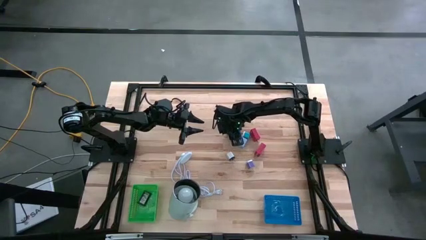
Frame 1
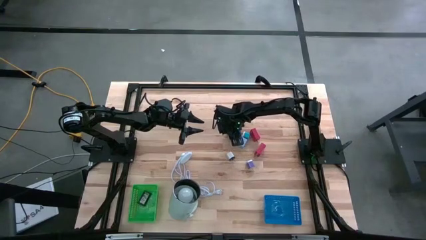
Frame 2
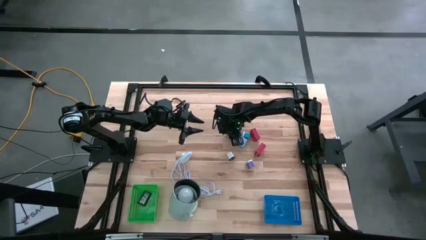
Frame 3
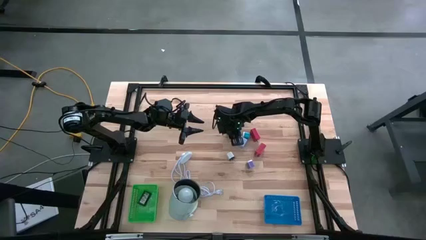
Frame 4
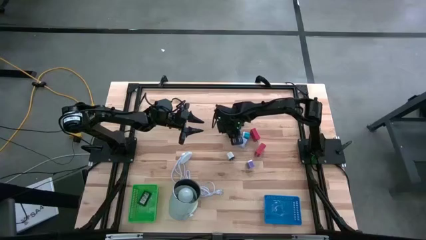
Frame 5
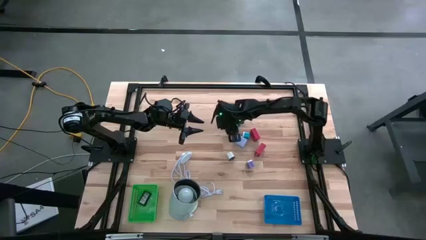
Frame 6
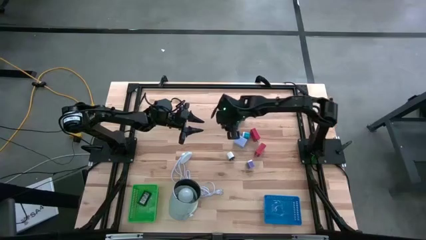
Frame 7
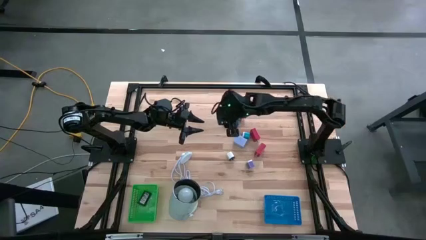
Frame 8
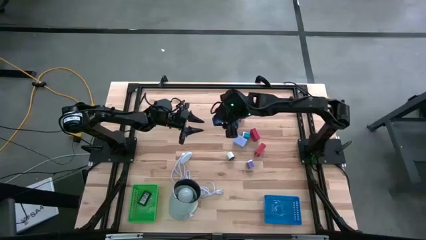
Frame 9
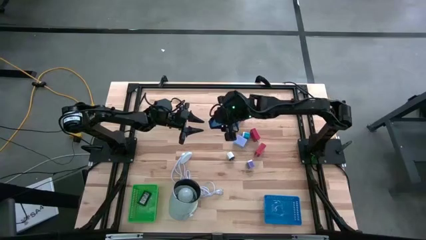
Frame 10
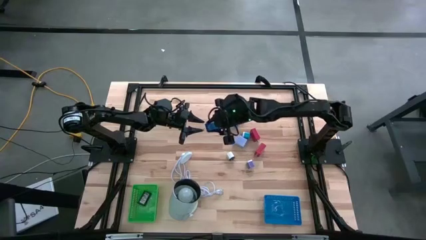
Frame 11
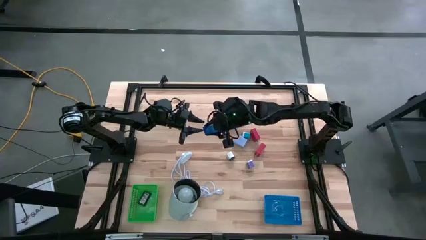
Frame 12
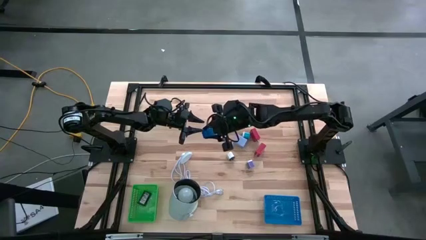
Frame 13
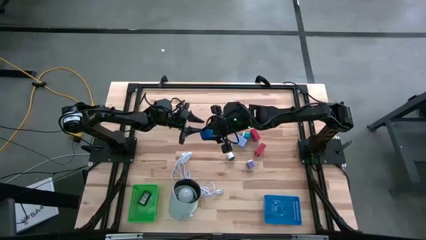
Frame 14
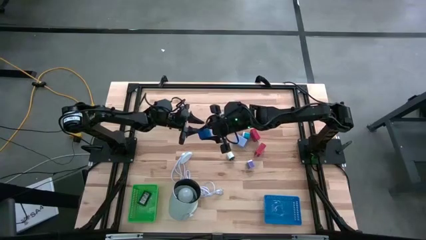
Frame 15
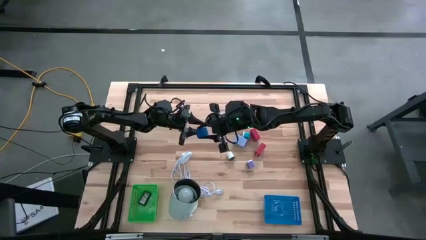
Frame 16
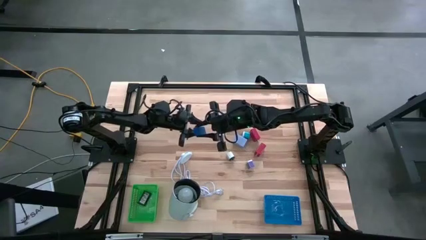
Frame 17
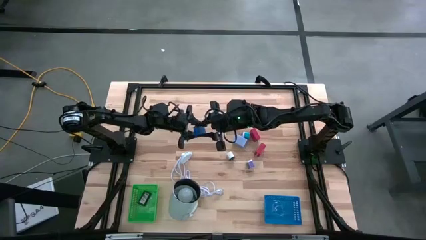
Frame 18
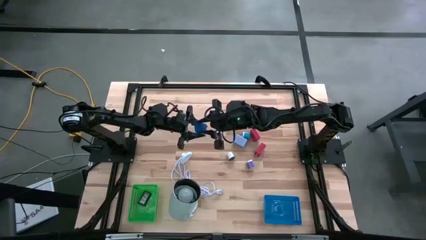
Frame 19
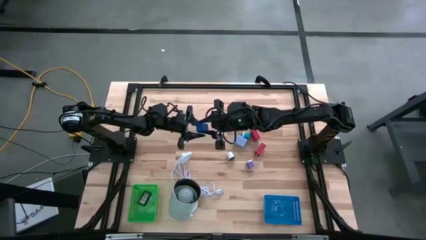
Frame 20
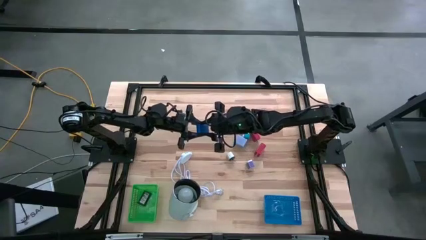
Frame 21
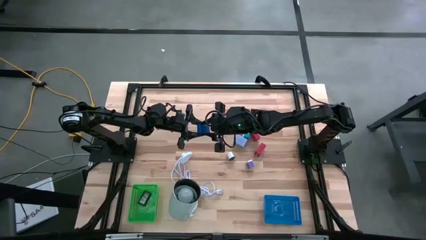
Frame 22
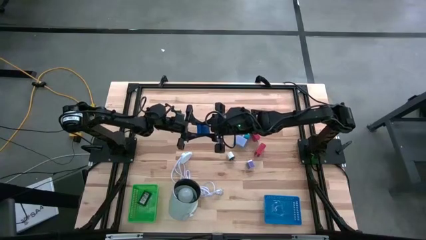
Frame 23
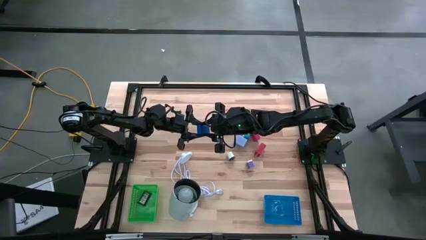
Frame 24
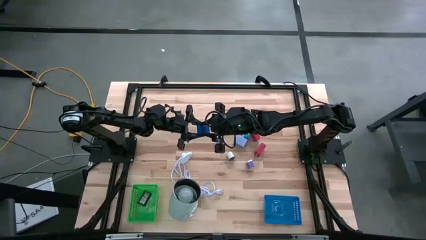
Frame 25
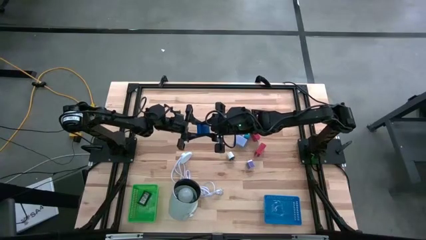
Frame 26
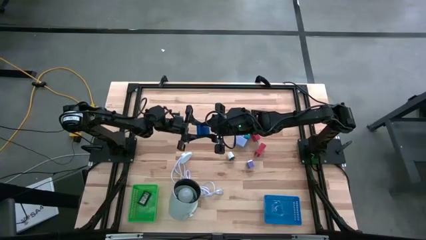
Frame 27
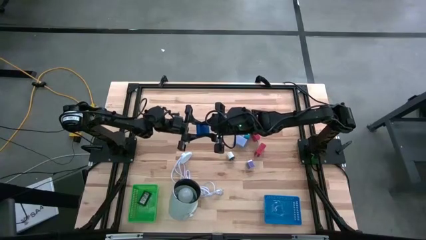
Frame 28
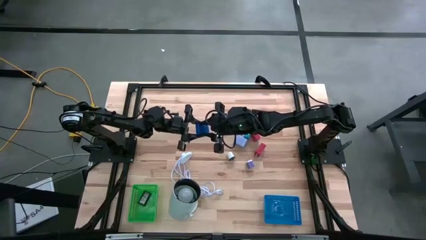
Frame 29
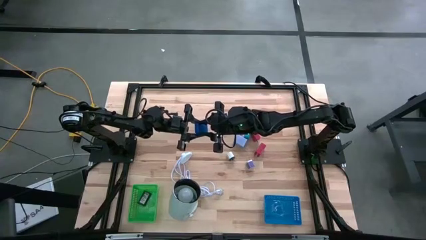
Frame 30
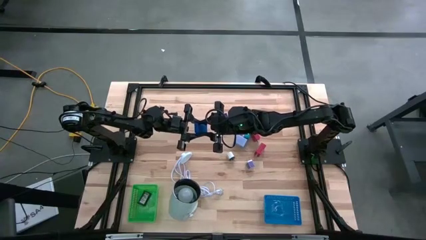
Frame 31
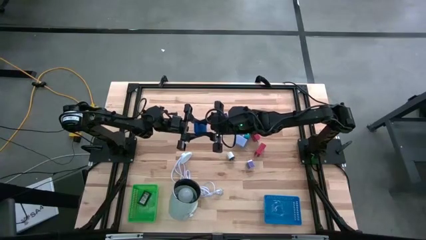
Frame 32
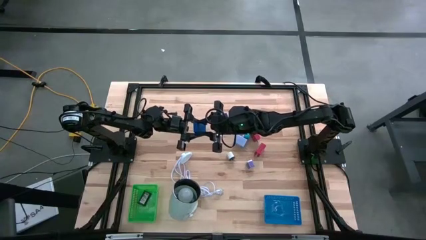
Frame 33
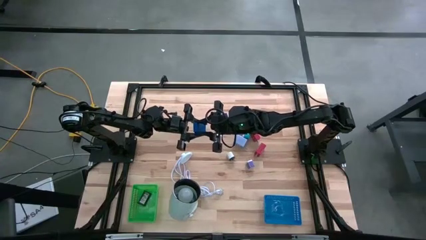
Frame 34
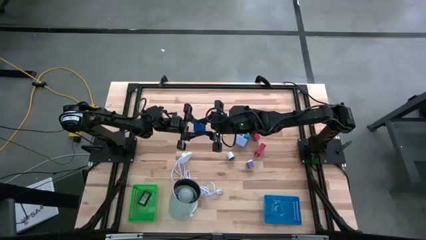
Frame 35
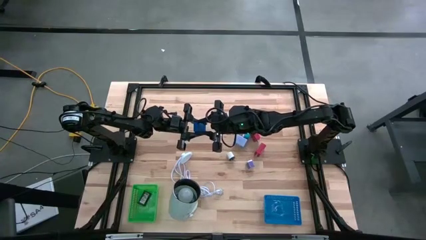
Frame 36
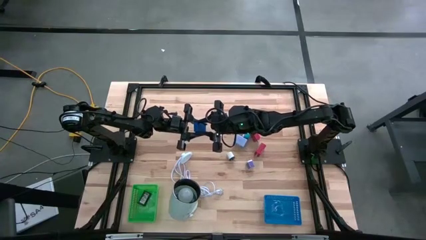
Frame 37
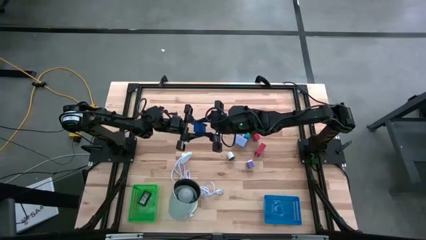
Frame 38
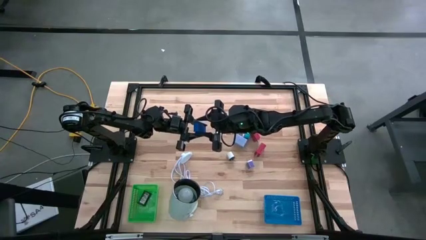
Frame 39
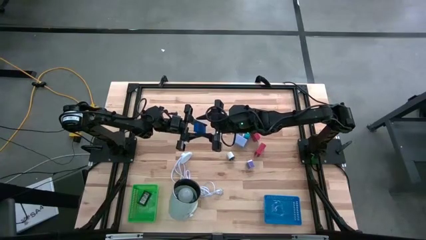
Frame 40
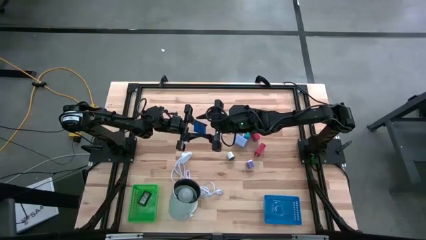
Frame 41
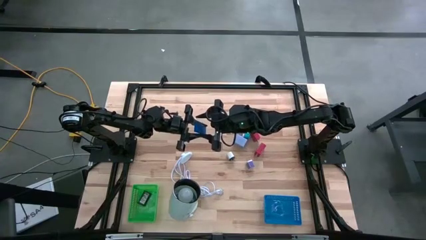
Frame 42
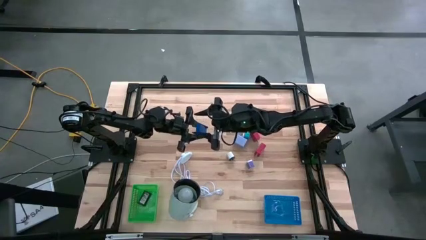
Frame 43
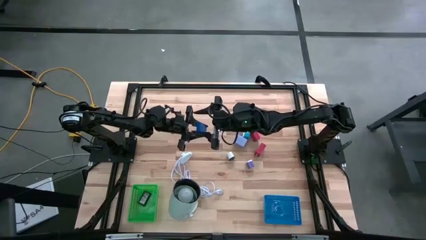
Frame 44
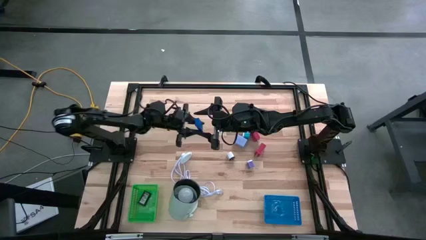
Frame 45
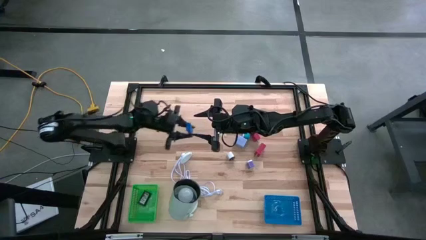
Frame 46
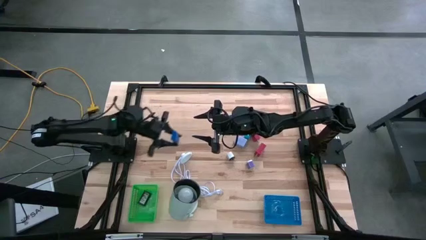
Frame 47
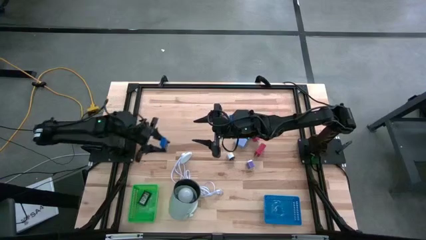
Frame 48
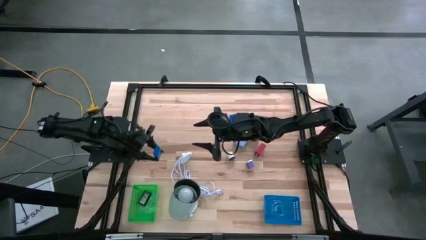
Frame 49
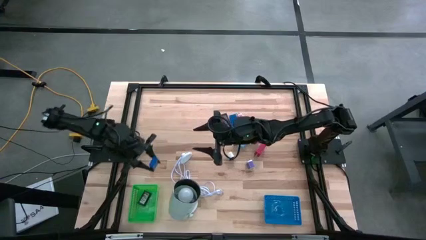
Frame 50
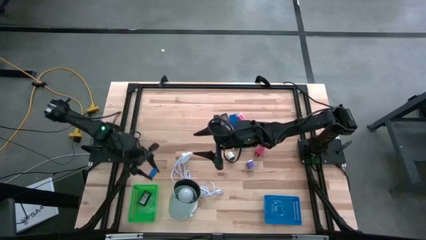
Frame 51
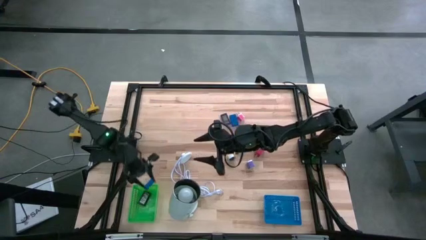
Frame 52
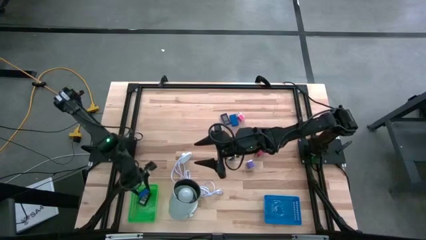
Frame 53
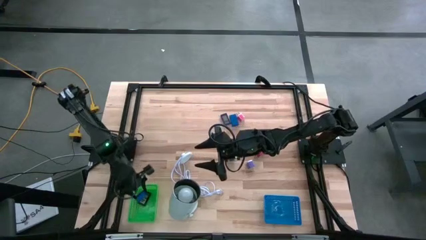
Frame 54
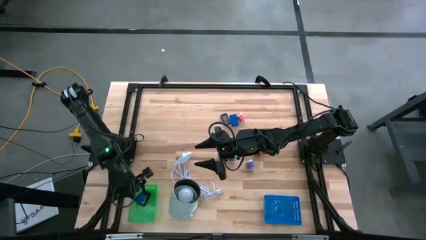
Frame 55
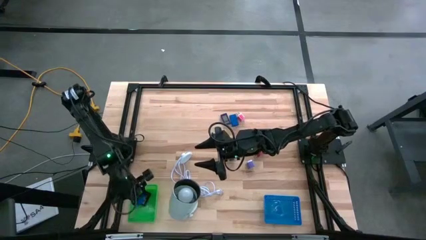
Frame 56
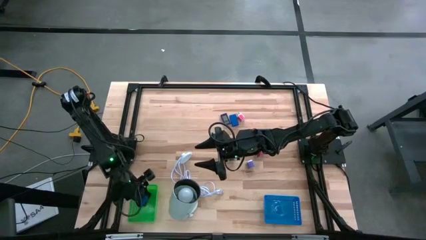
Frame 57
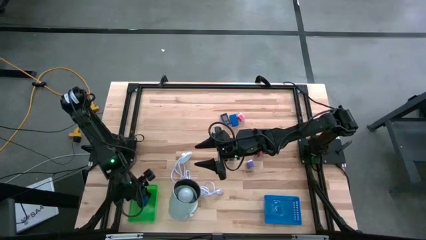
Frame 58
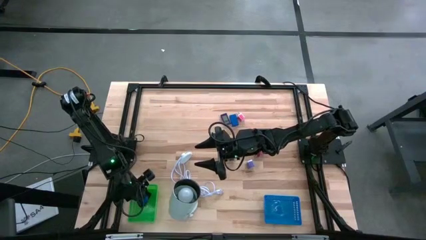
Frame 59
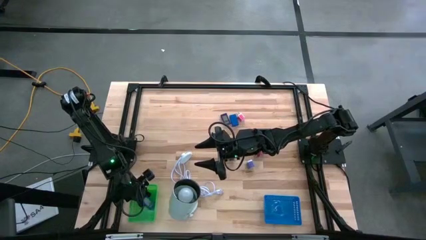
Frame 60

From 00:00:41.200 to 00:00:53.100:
Task: Pick & Place Office items
Put the bottom blue digital timer into the green basket

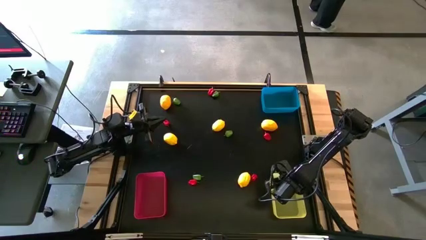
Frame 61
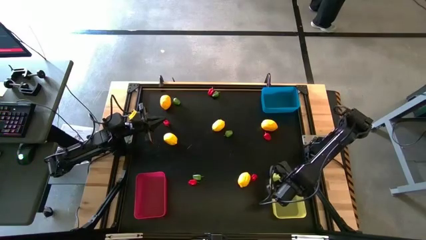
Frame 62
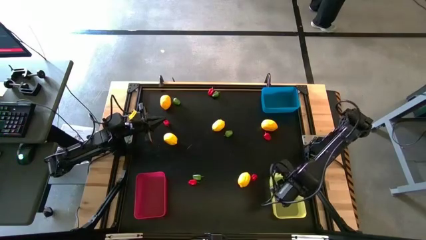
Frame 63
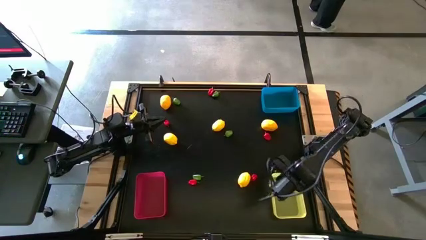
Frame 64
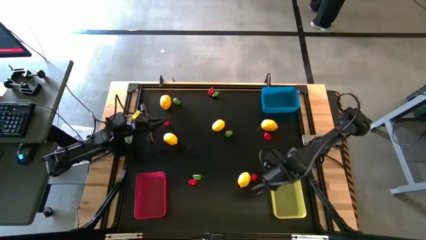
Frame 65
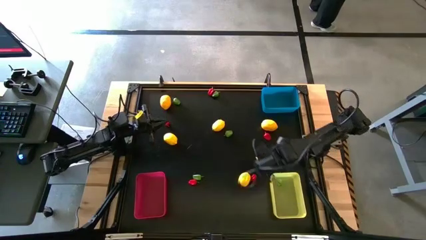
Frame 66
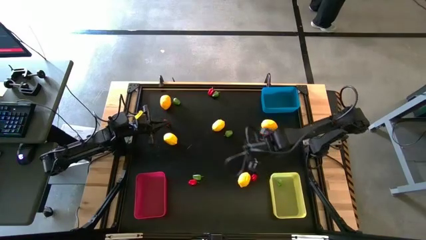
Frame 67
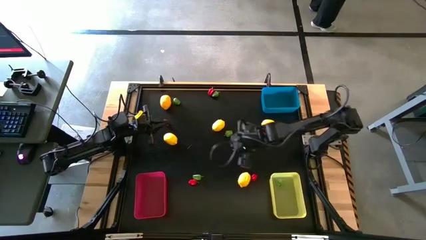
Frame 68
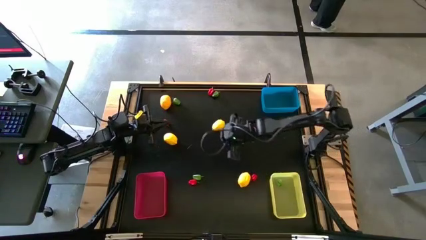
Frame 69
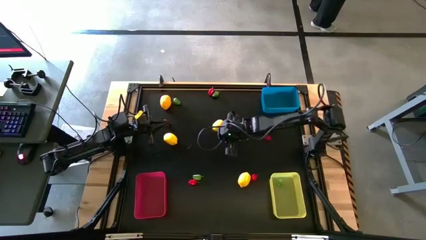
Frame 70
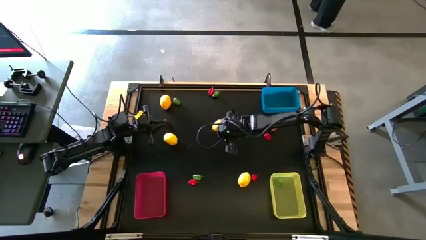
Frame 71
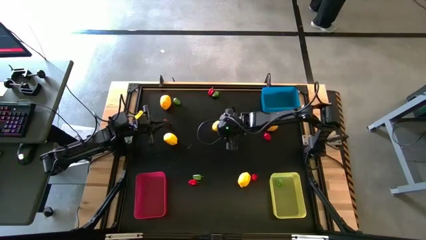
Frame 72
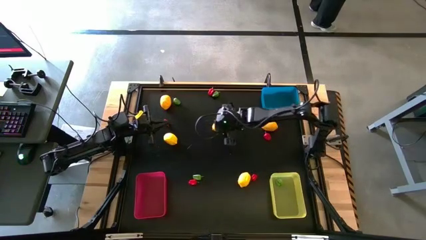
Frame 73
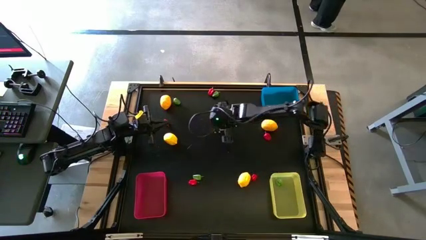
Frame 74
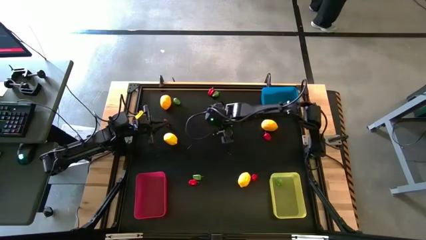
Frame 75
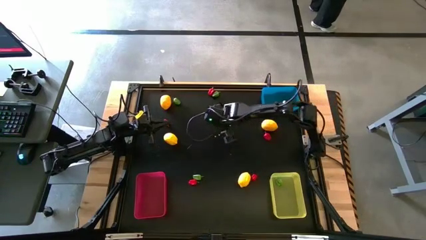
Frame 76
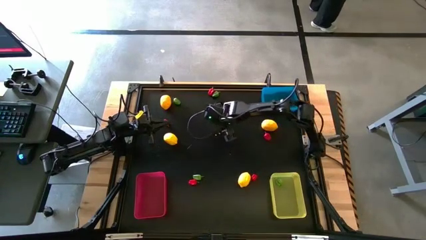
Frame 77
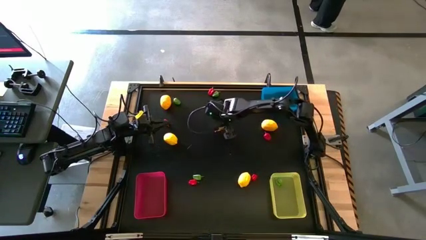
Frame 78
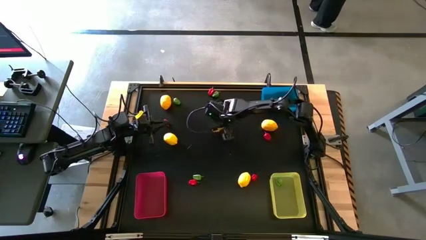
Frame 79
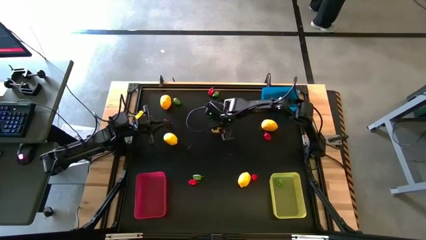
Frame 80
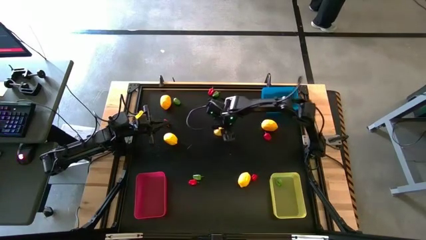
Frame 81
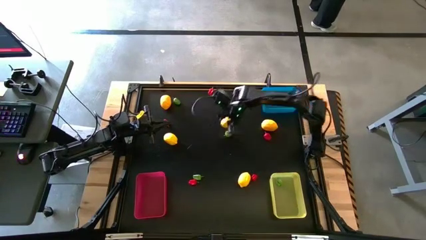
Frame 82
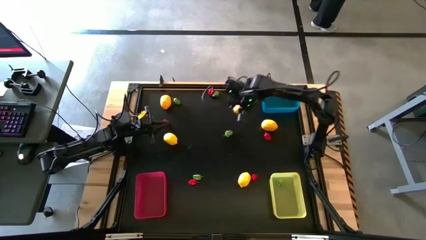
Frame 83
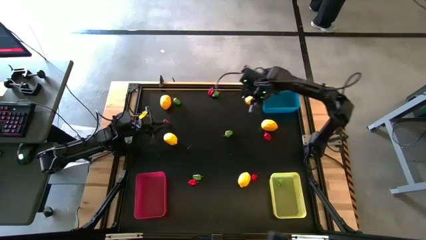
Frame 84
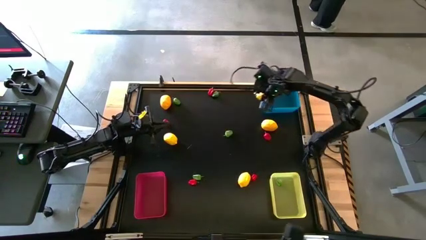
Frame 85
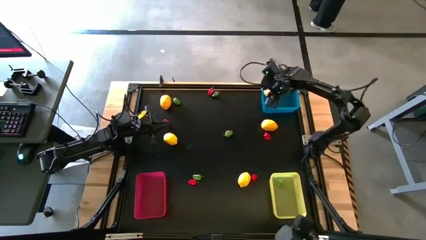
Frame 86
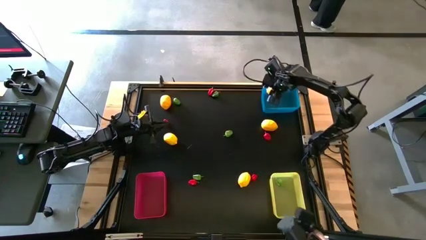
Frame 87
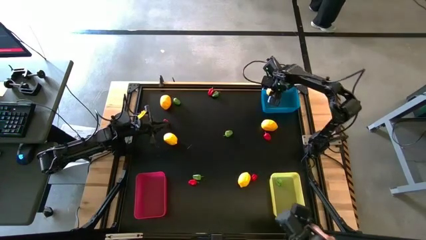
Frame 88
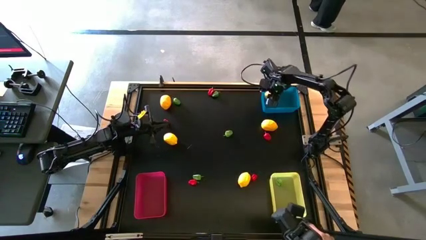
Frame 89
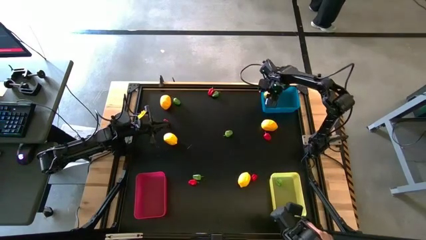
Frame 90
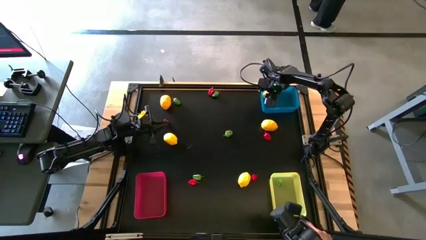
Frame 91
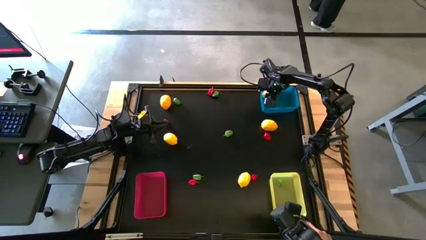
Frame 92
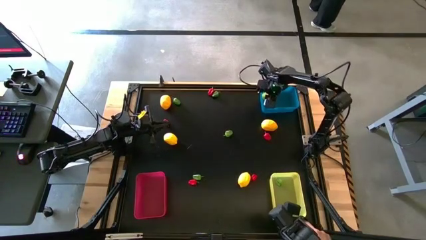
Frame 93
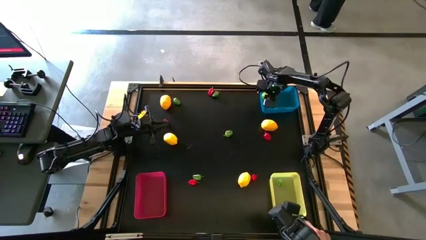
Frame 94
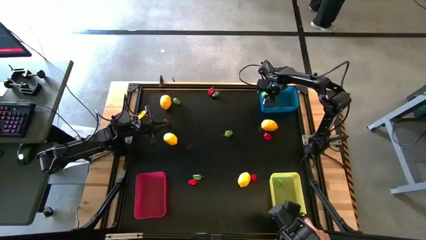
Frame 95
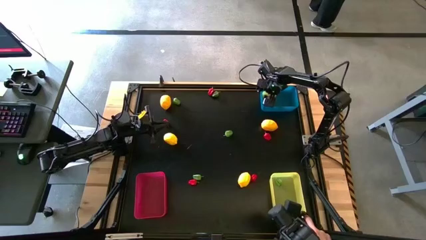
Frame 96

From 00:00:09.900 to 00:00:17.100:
Task: Sort produce into baskets
Put the yellow lemon into the blue bin
